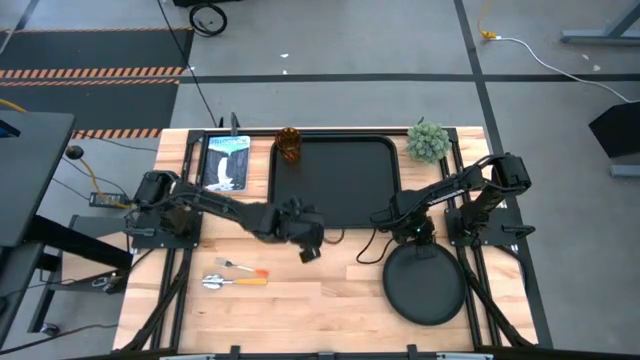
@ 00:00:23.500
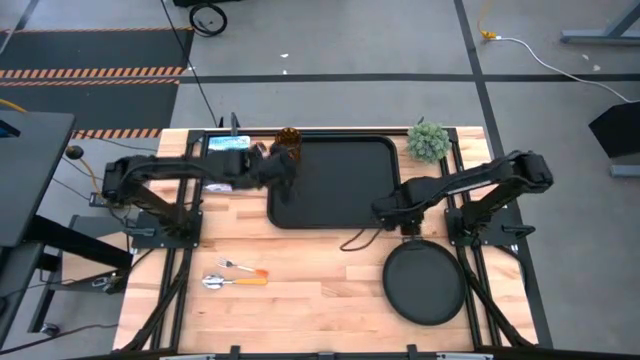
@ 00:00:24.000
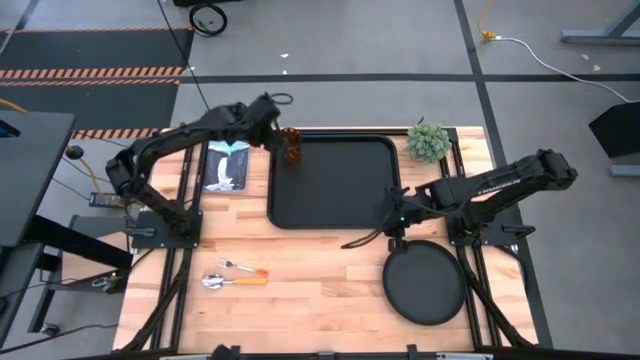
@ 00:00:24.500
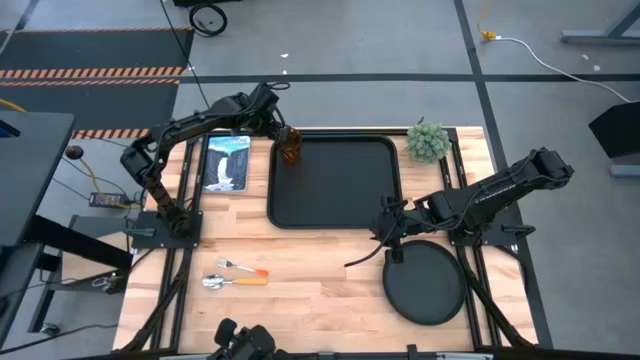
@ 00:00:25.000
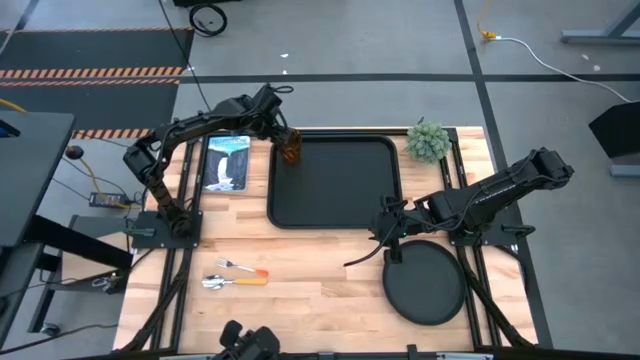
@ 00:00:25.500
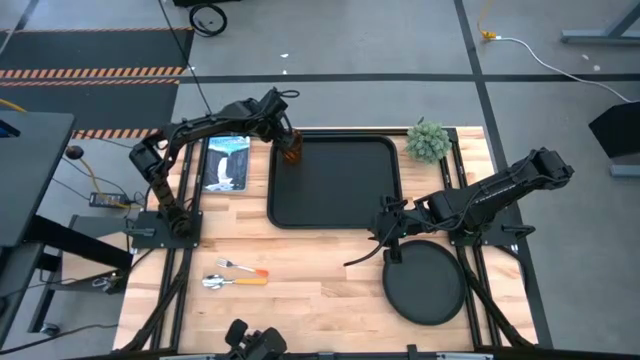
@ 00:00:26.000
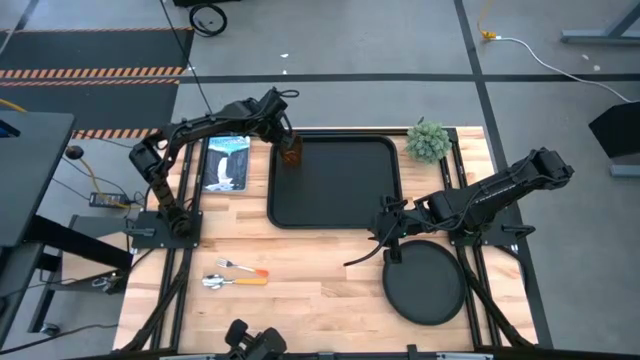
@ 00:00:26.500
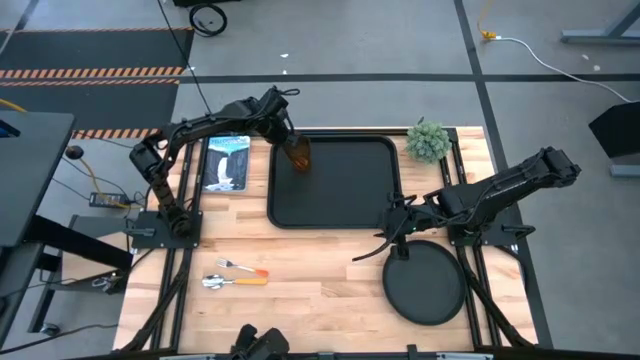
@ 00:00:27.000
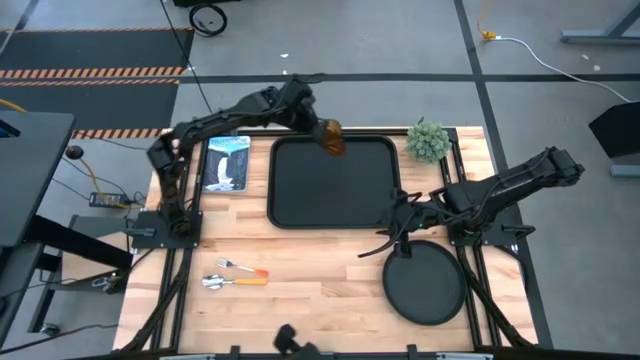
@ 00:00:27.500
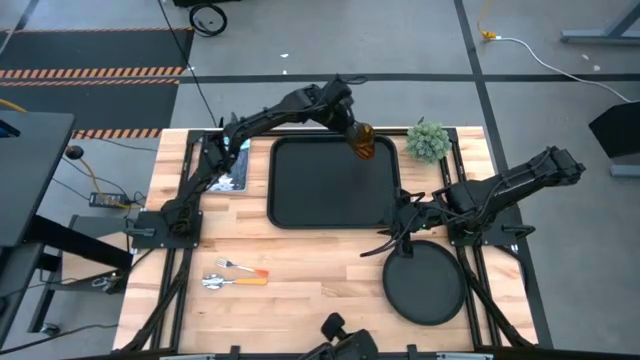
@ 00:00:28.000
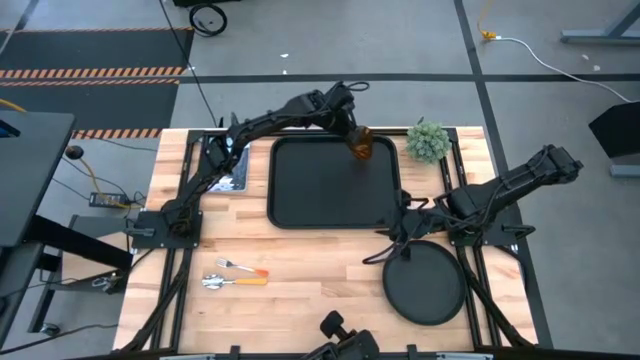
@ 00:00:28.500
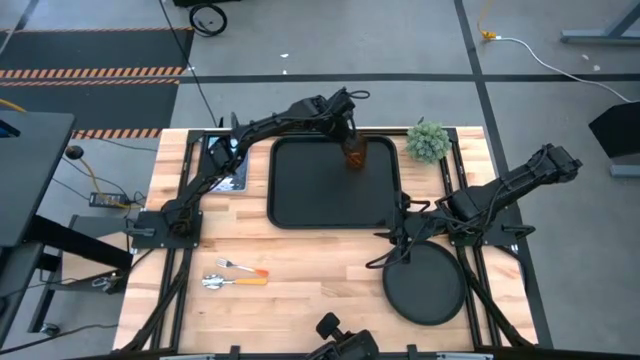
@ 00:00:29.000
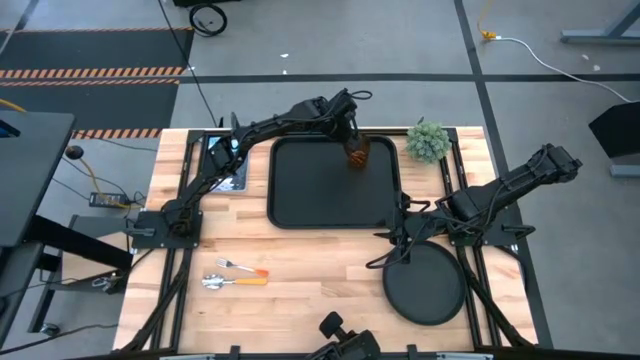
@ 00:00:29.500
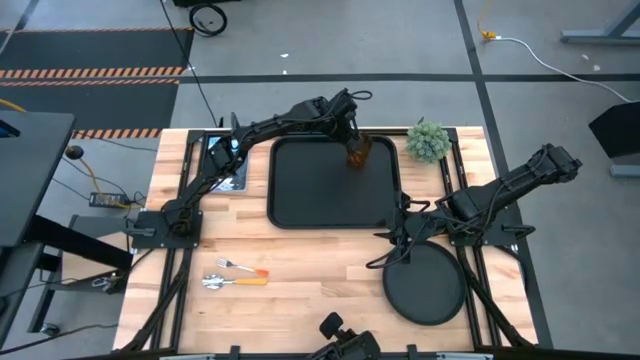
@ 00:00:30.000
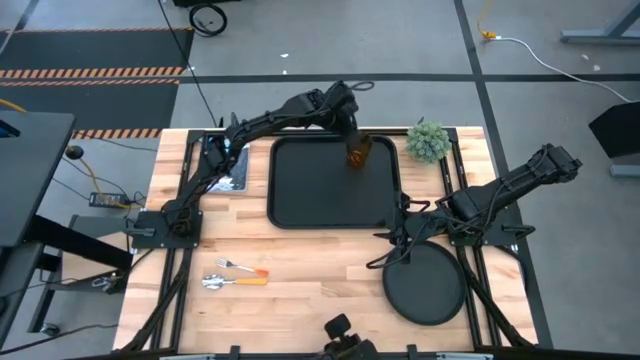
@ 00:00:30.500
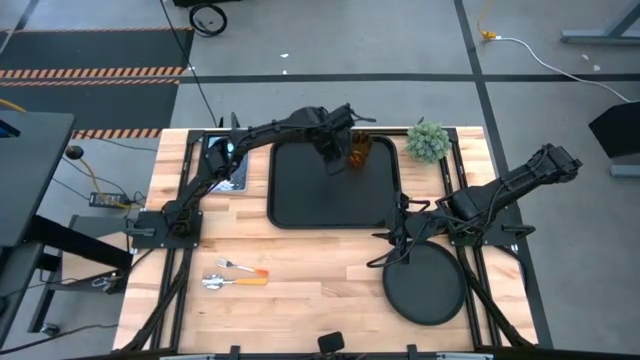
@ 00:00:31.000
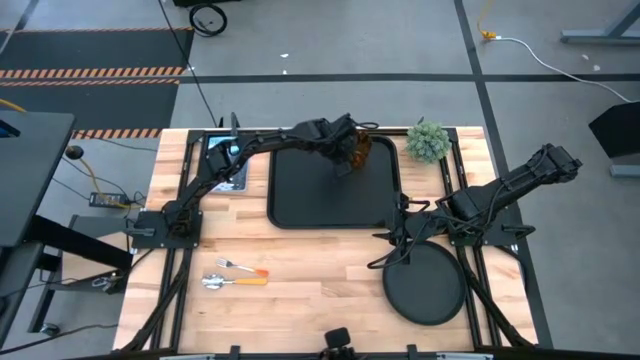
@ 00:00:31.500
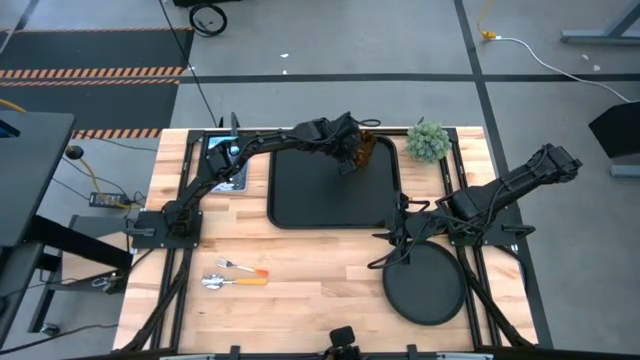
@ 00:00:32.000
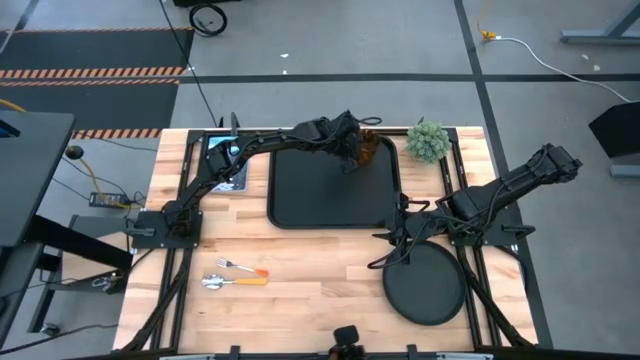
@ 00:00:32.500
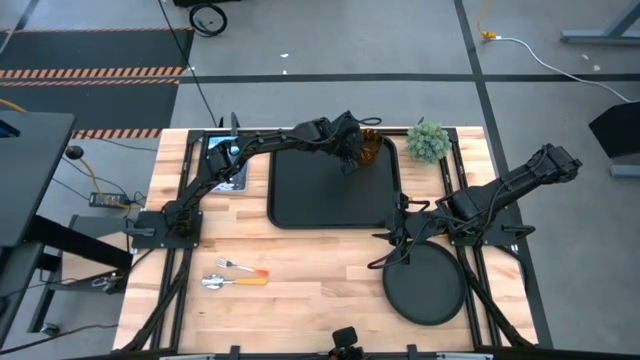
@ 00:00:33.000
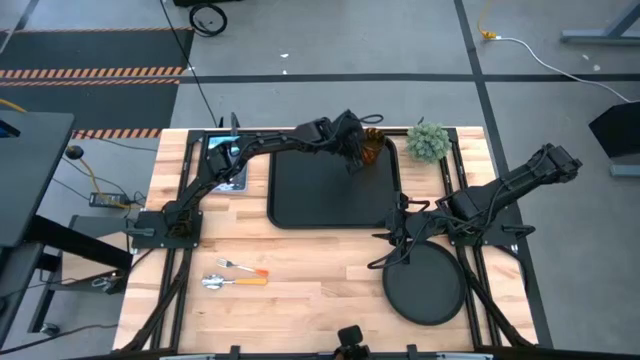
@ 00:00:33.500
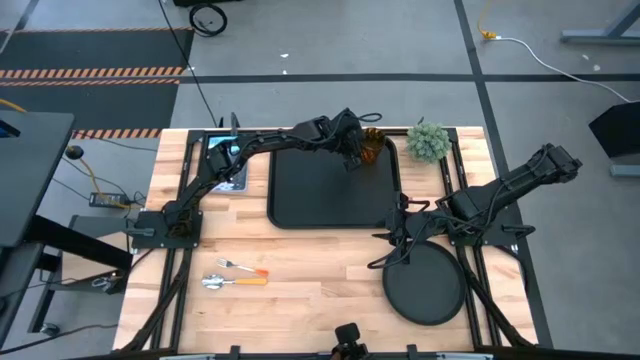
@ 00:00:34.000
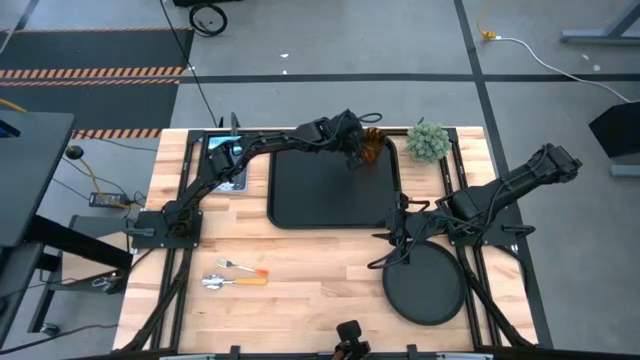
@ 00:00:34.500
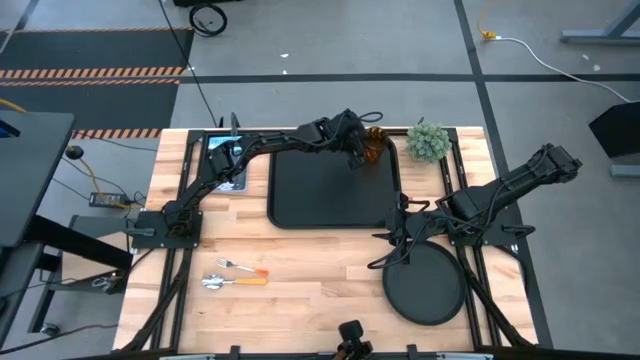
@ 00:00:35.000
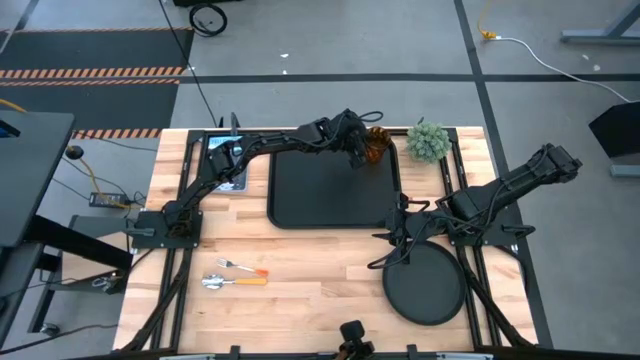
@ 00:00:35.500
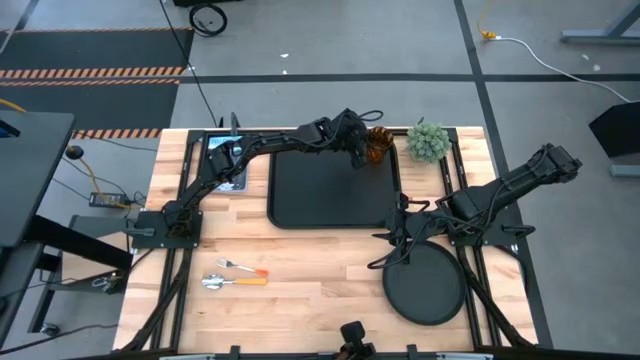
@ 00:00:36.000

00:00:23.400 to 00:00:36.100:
Task: Pick and place plate/cup/fork/spoon on tray
Move the orange glass to the top right of the tray

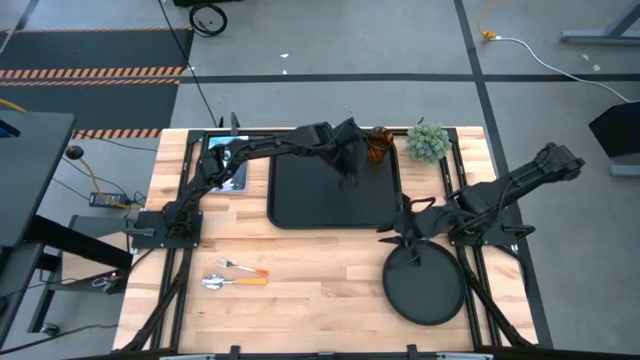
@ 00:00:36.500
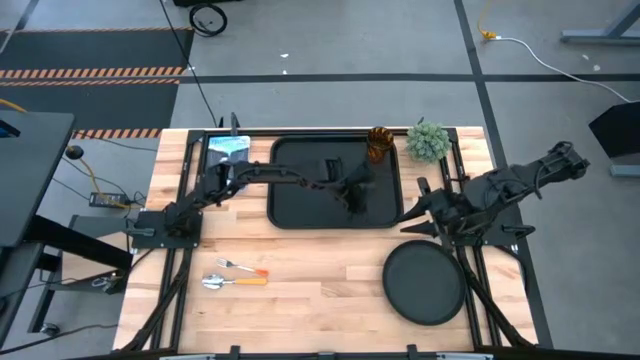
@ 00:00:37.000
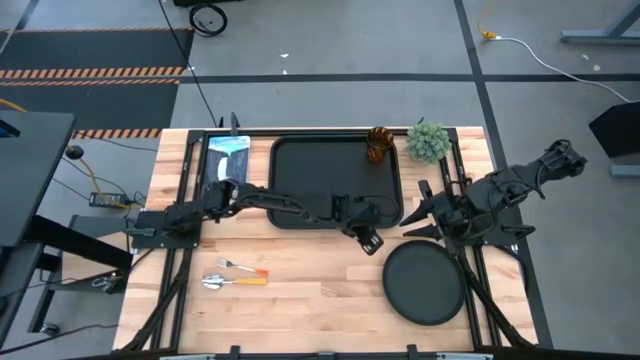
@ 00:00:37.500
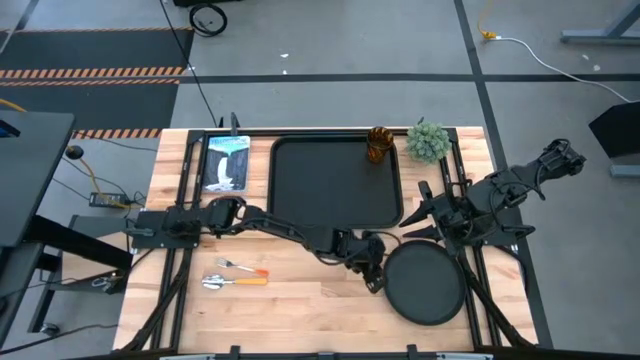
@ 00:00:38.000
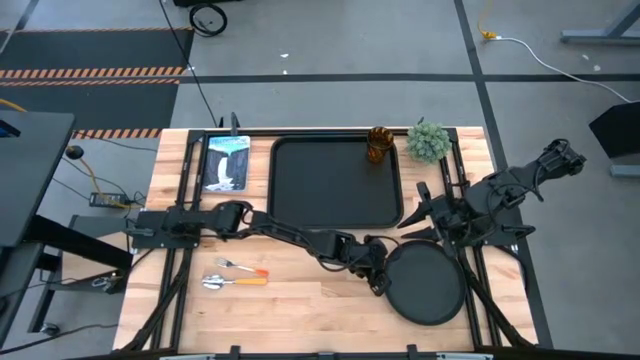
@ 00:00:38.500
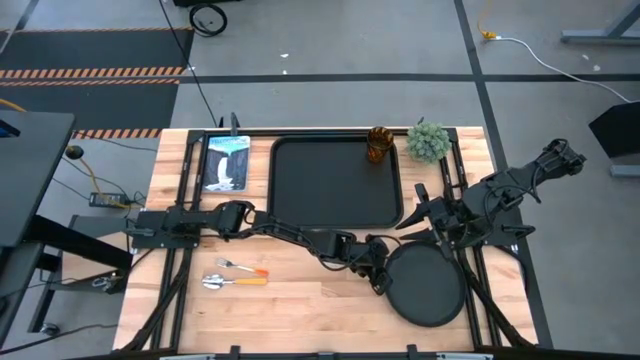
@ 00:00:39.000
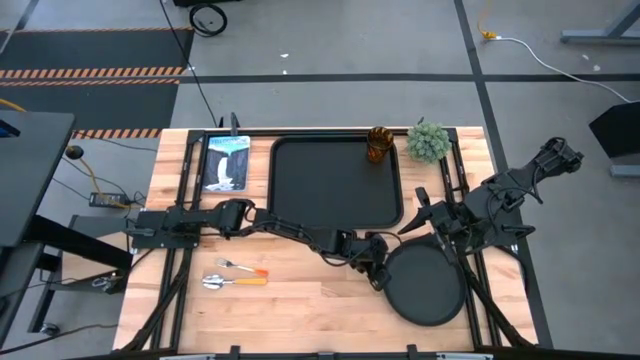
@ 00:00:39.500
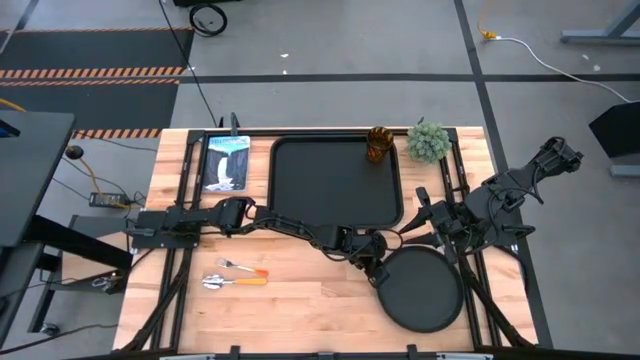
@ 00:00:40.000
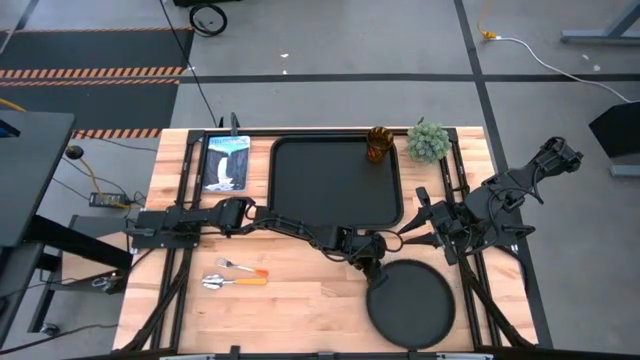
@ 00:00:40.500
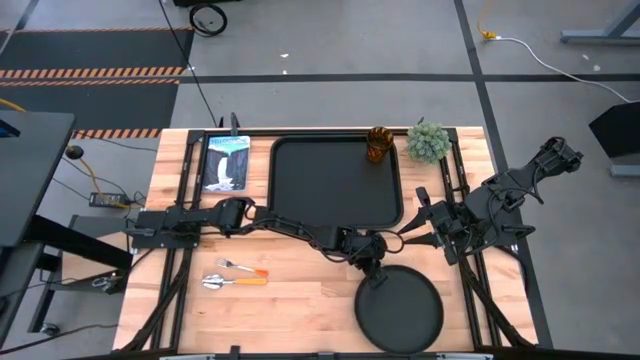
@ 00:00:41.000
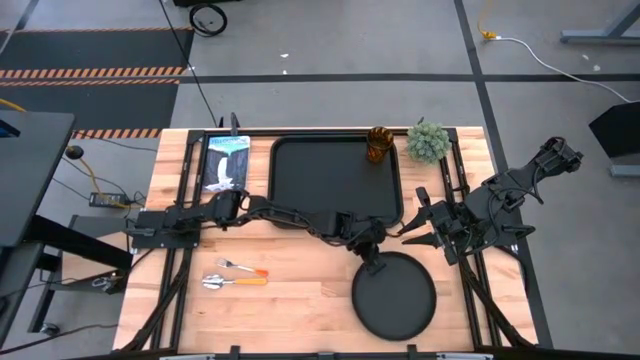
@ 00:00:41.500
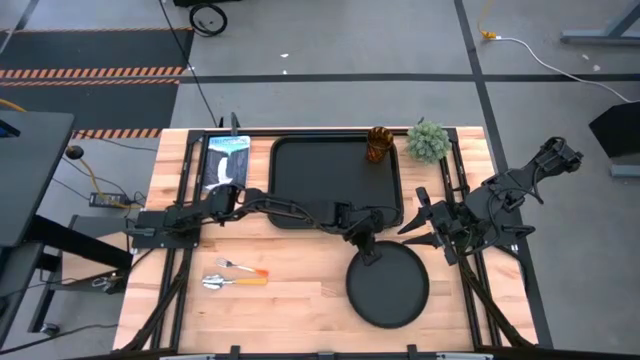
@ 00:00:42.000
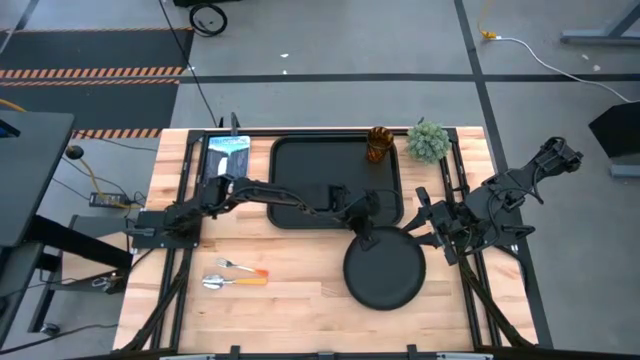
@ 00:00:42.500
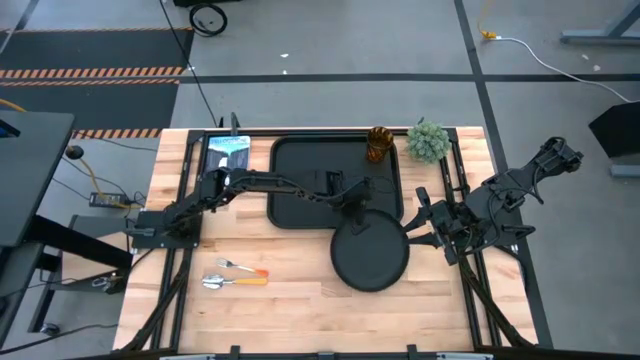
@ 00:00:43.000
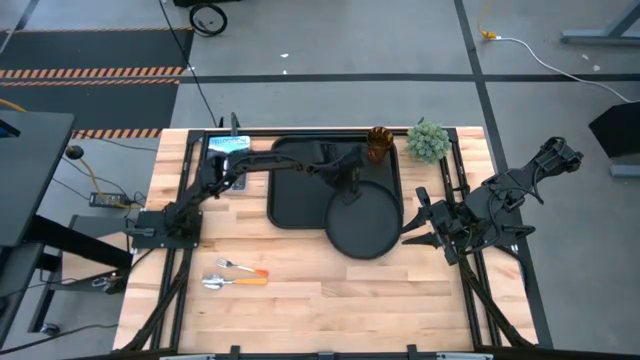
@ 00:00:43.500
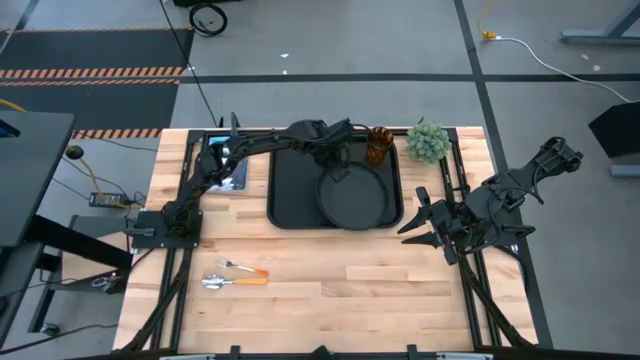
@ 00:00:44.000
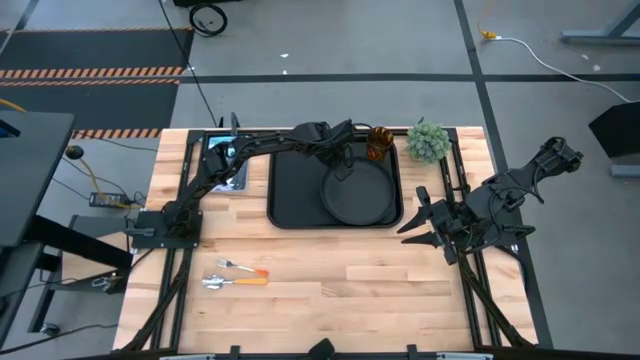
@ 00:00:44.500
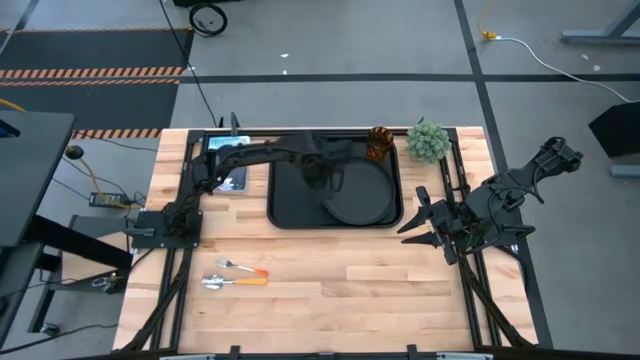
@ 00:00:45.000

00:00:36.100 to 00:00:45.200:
Put the black plate on the black tray
